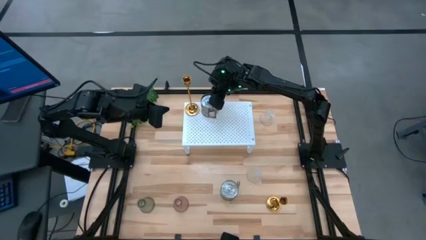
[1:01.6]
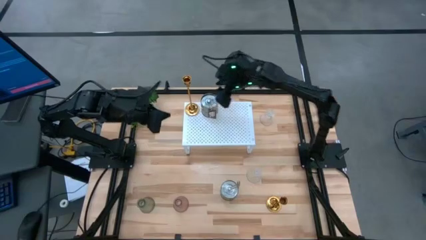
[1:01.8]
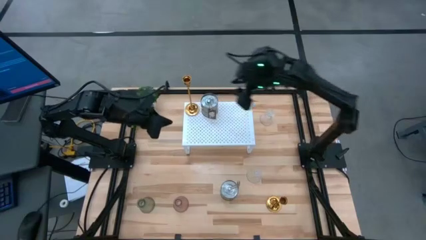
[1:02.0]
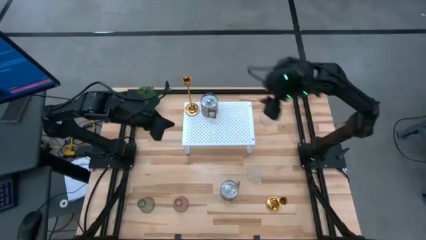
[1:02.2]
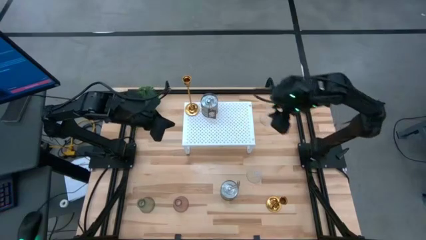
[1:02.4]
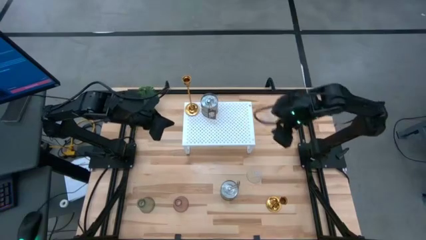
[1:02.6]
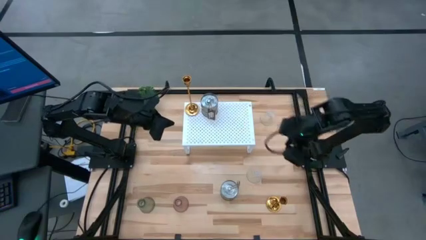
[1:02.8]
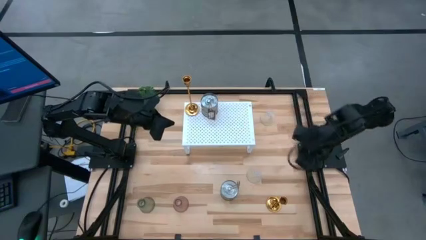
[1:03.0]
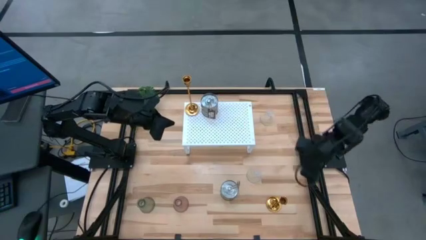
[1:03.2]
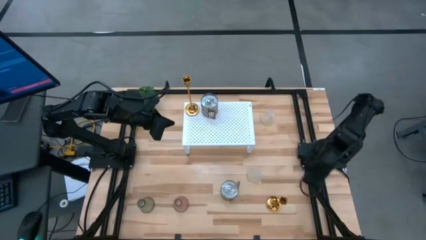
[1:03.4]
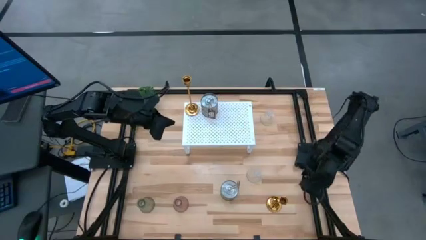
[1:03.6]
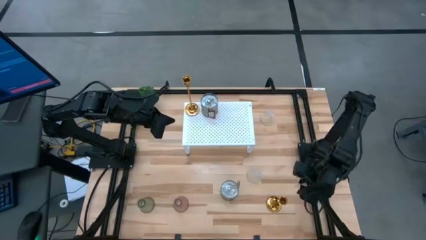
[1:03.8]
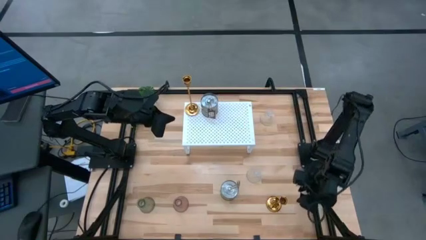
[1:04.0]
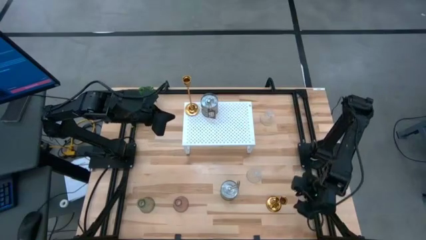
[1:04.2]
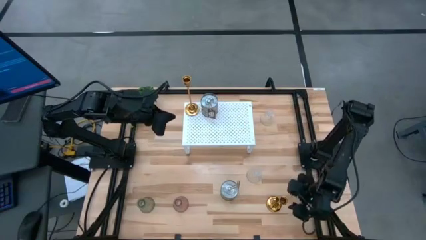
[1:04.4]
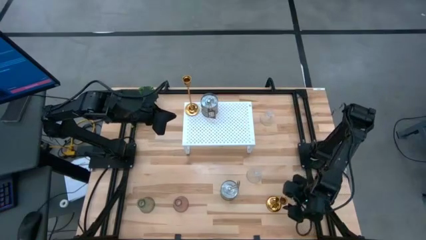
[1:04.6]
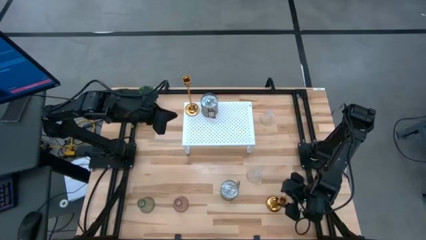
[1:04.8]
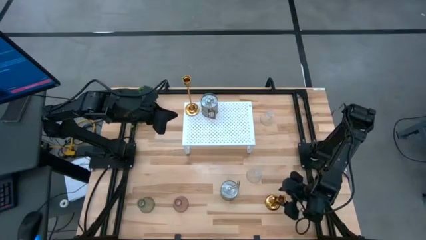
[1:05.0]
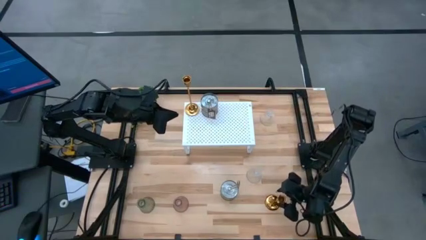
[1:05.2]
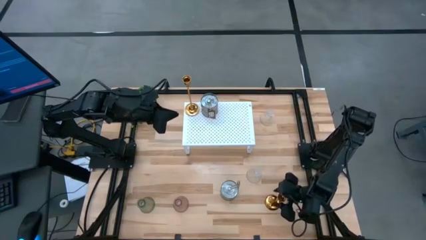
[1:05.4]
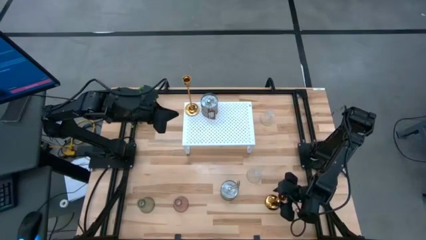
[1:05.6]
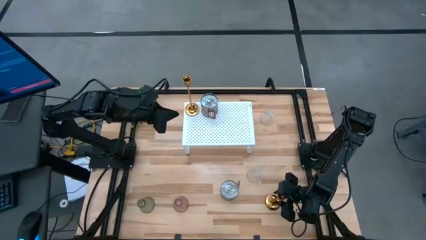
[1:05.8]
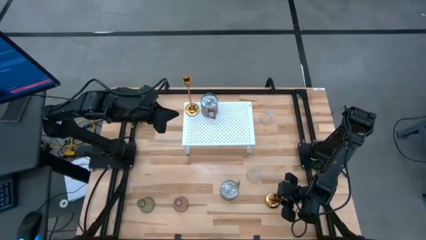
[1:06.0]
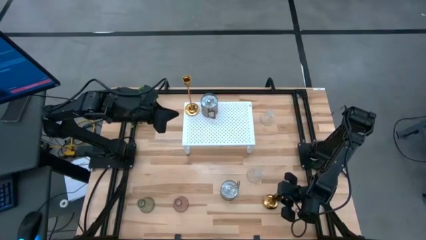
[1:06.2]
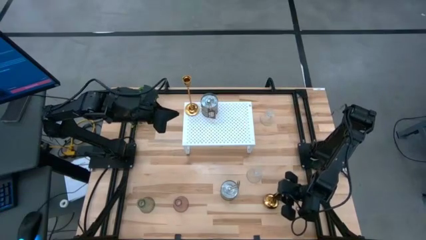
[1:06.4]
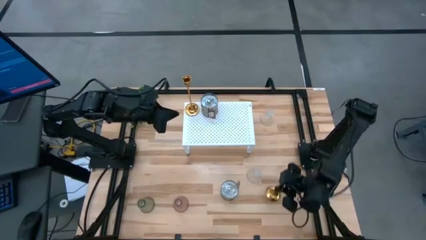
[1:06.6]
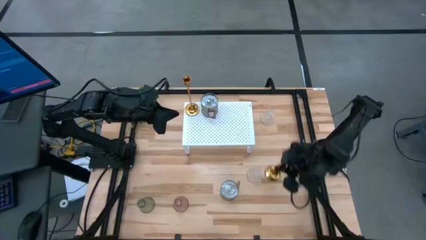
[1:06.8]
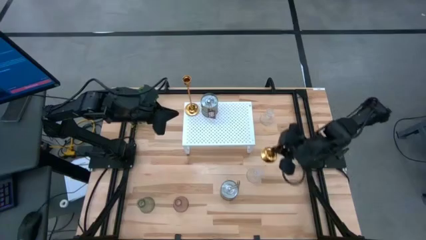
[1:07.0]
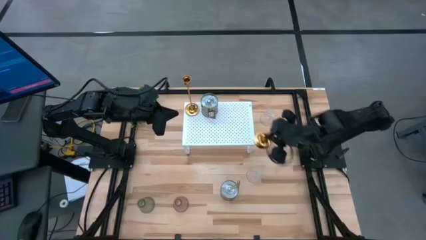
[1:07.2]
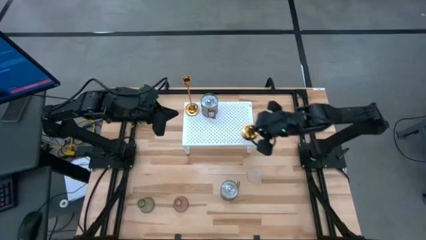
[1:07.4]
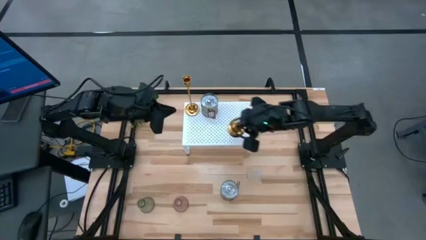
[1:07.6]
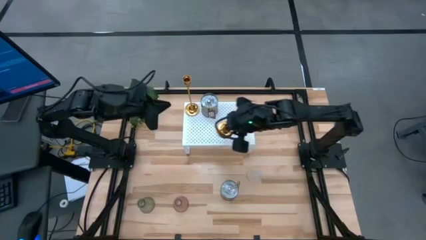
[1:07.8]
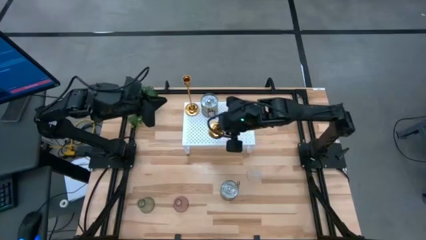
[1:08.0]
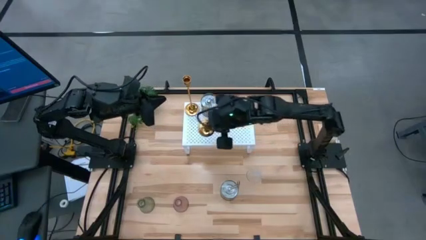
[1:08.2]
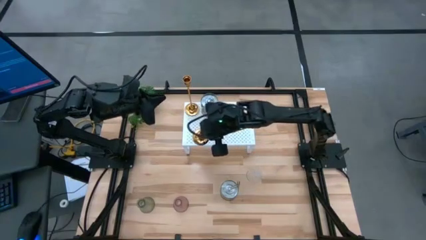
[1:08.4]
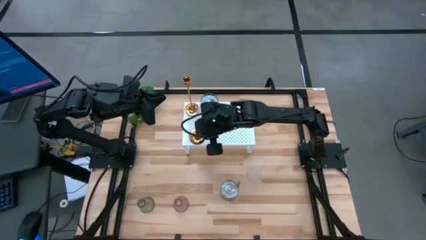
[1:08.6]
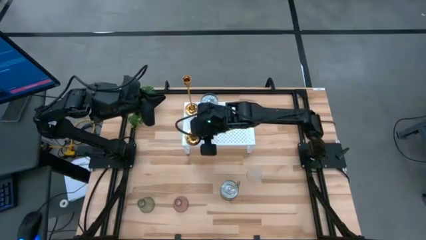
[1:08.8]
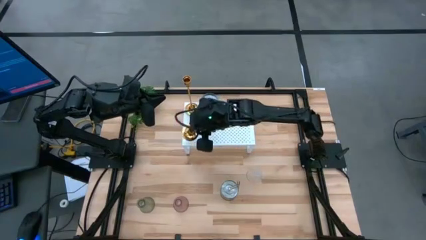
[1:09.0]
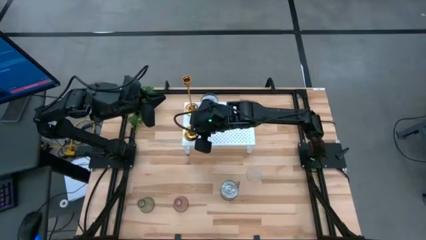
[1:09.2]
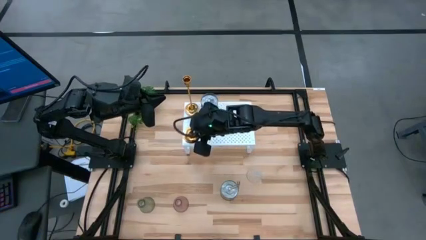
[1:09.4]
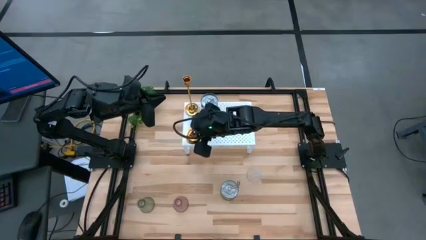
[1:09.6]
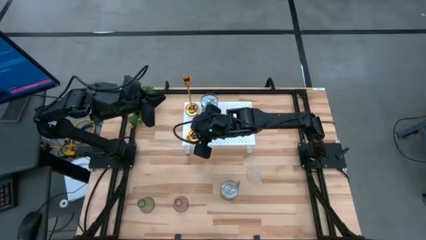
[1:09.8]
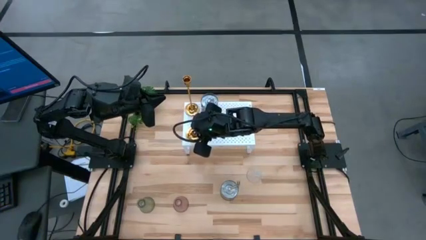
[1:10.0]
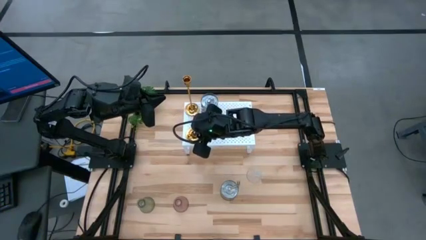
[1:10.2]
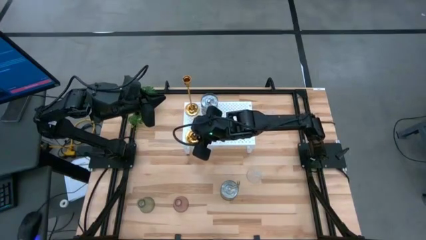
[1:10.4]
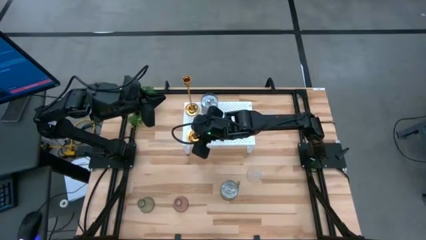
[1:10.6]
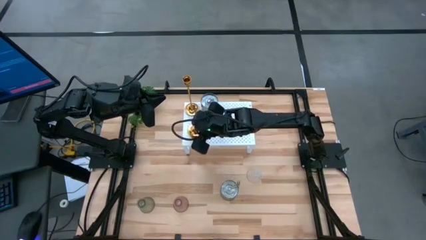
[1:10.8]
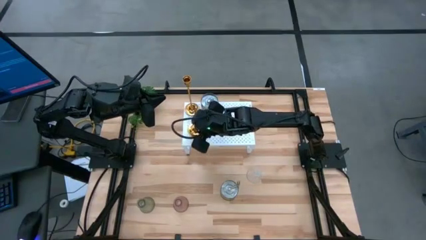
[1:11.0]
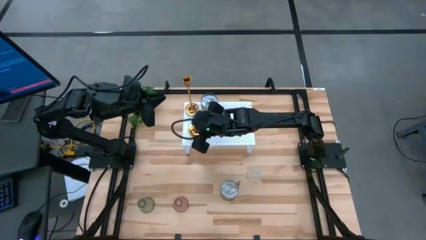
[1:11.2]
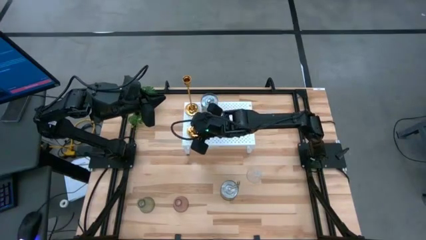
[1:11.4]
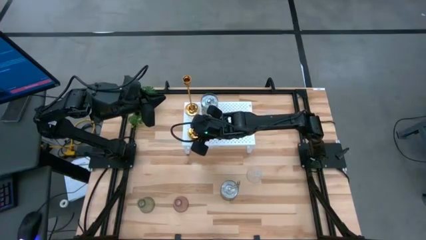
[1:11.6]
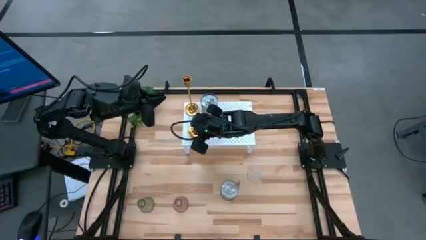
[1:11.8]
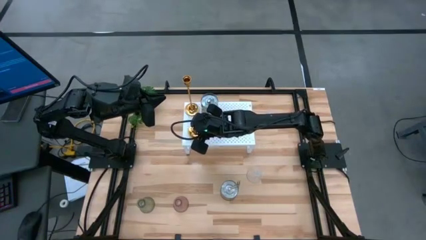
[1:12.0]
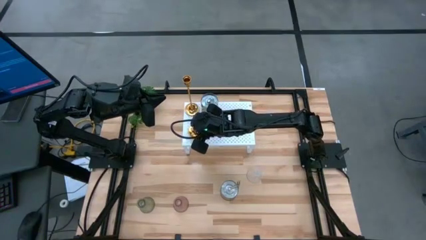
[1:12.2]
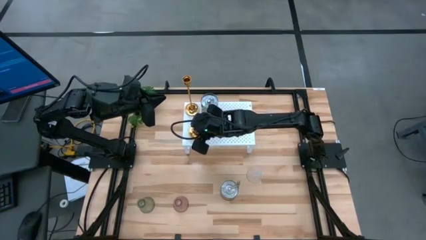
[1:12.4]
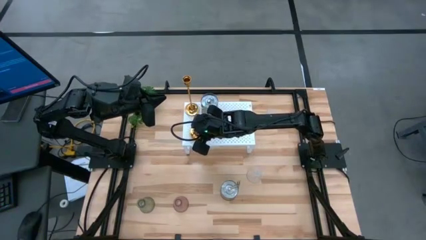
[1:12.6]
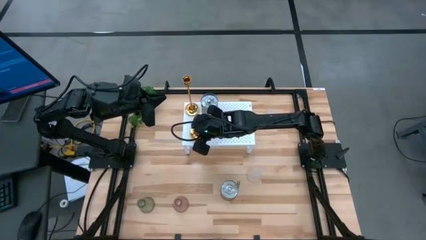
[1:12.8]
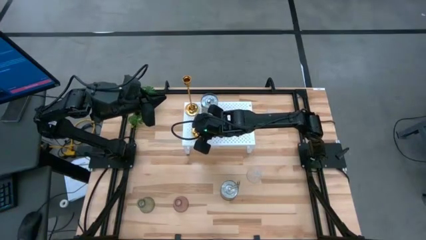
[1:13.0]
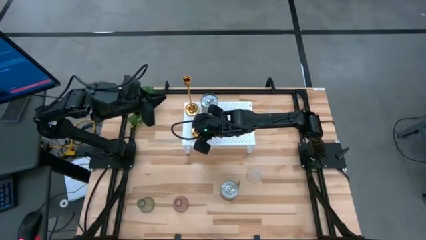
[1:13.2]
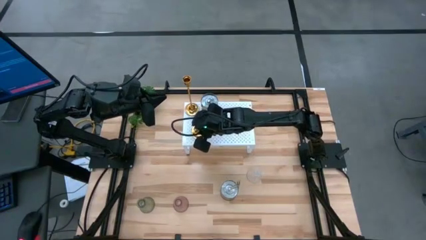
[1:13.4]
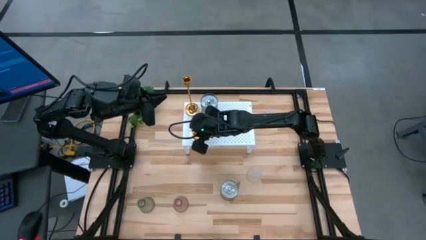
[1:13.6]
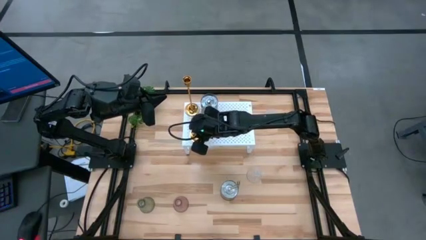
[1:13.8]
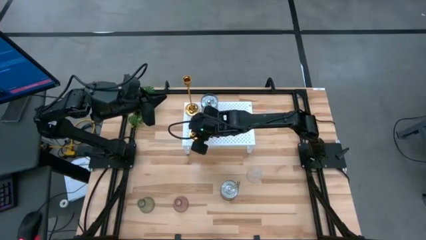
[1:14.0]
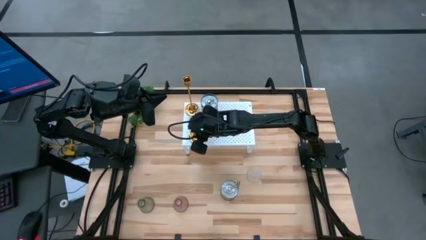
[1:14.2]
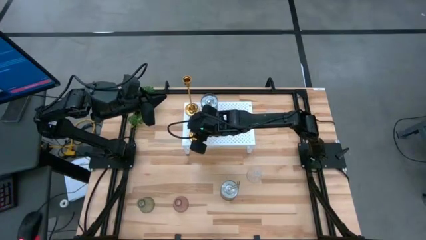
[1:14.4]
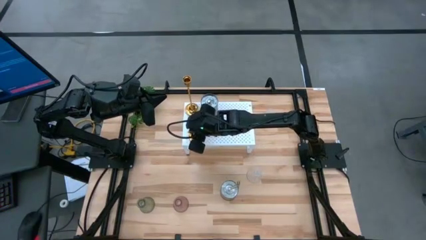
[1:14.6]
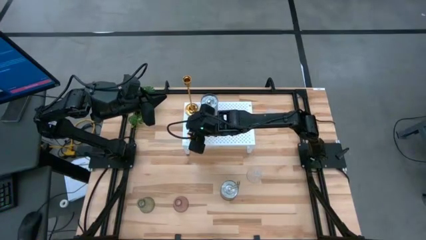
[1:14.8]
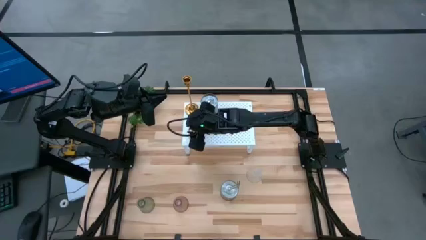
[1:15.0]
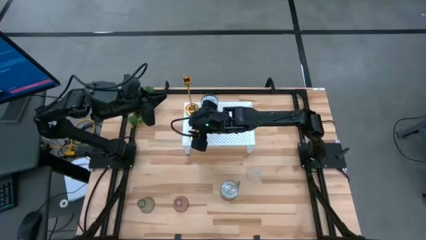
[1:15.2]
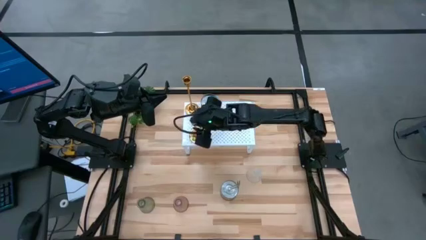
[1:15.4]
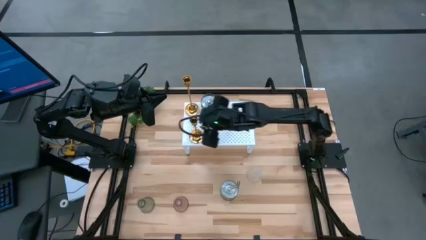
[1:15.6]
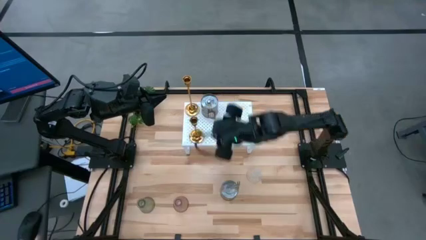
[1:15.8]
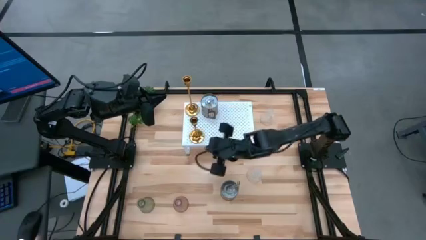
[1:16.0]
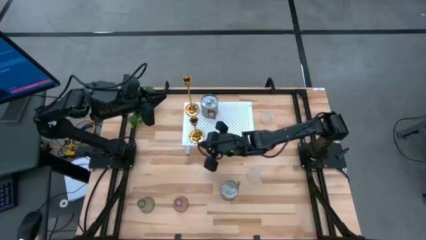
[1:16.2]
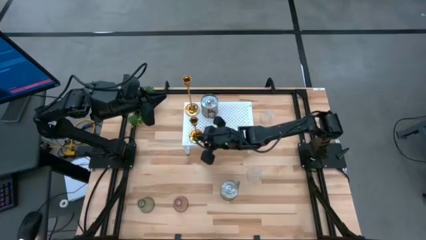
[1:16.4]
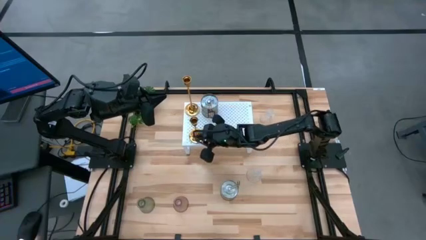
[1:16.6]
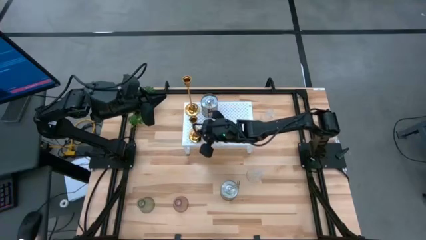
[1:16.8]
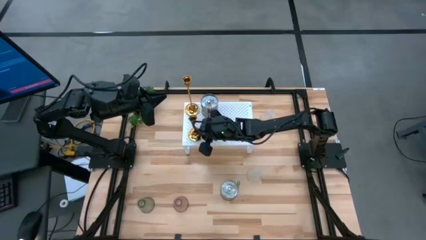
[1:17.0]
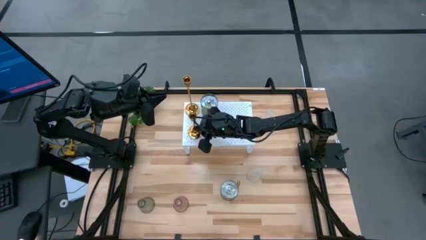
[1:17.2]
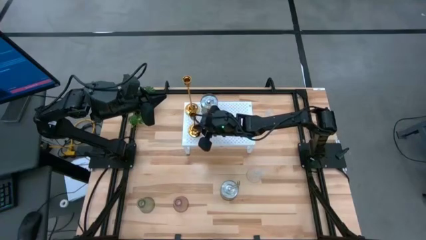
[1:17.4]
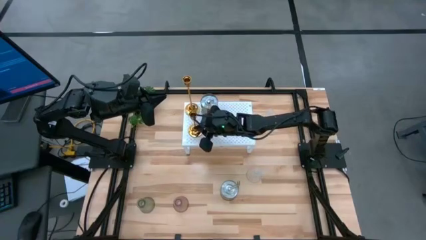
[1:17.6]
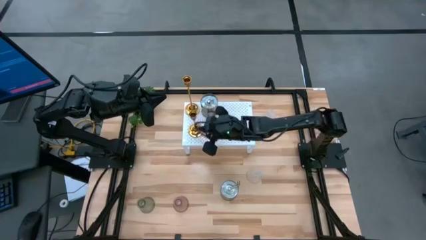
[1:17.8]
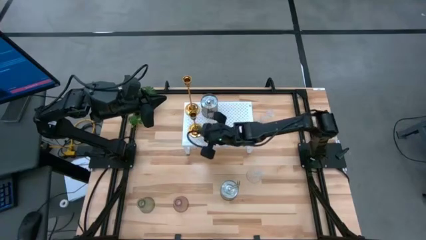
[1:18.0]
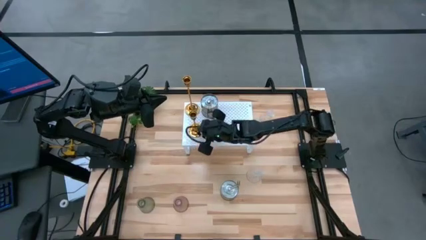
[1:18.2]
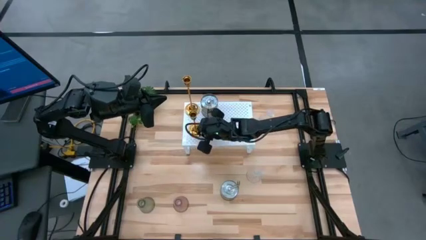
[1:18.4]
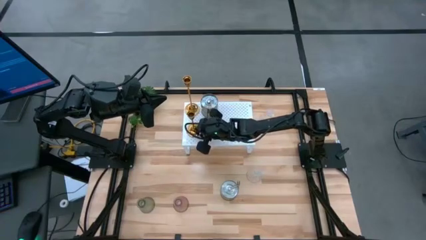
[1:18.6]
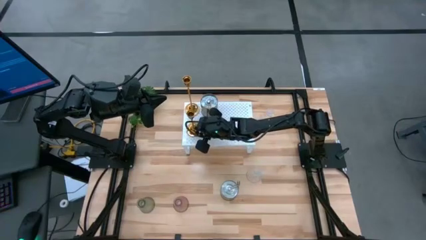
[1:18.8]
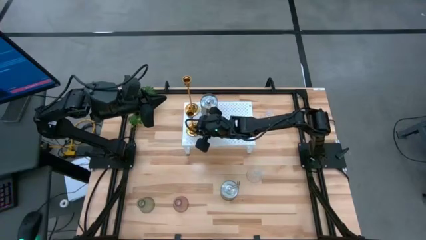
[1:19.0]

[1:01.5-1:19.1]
Task: Pick & Place candle stick holders
Put the gold candle holder on the shelf
